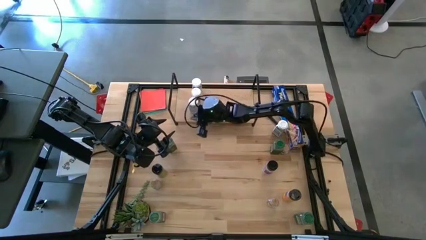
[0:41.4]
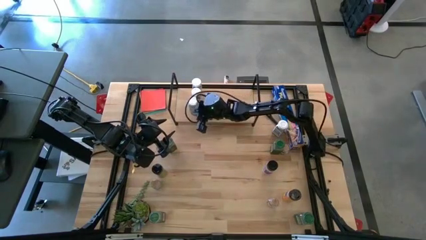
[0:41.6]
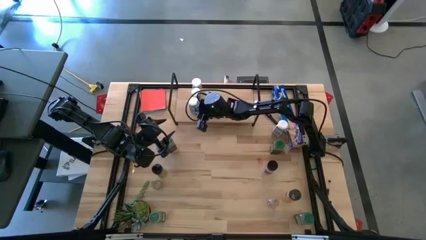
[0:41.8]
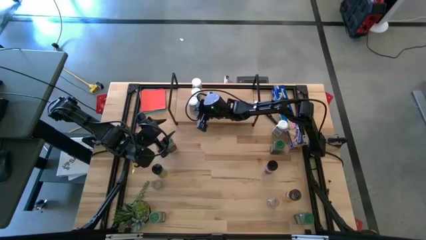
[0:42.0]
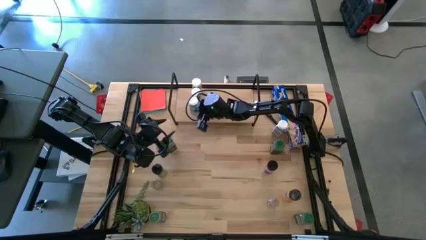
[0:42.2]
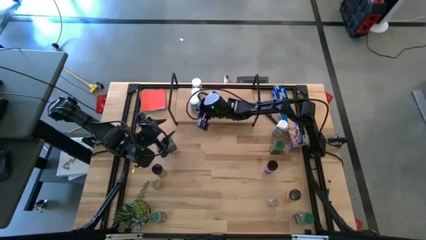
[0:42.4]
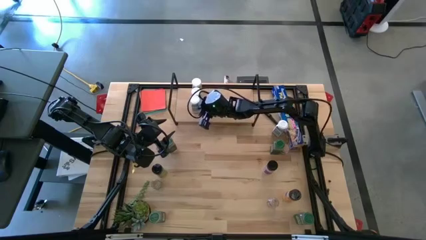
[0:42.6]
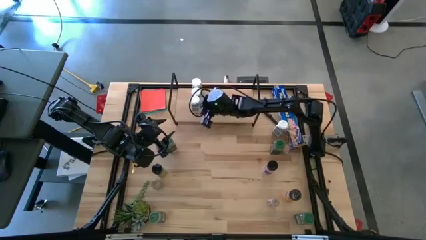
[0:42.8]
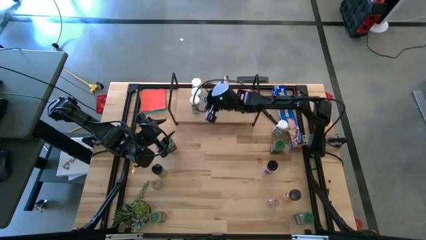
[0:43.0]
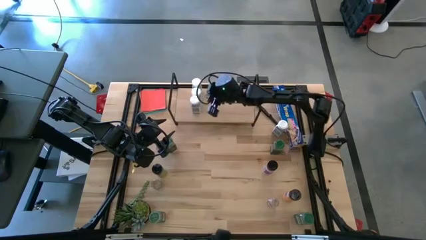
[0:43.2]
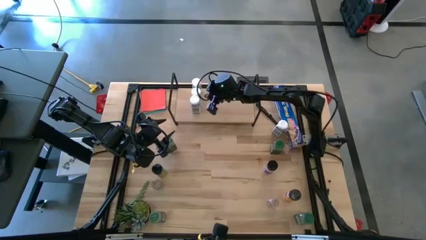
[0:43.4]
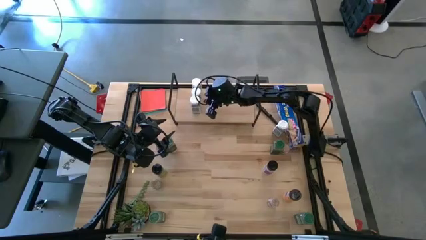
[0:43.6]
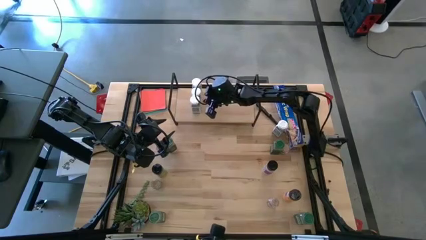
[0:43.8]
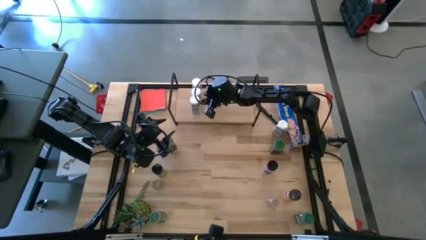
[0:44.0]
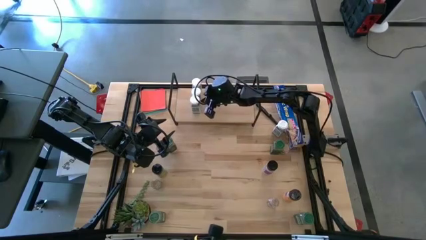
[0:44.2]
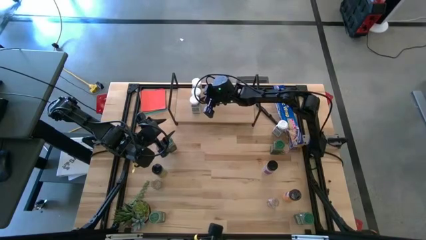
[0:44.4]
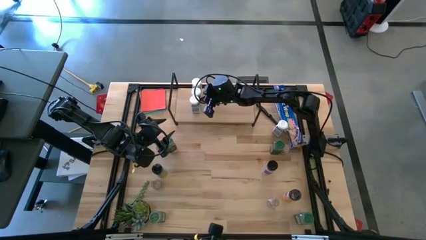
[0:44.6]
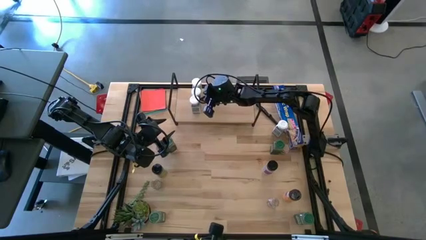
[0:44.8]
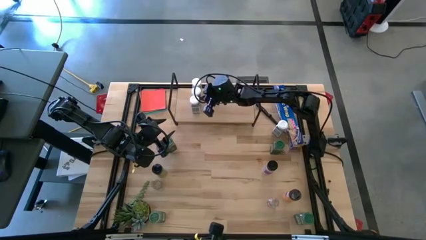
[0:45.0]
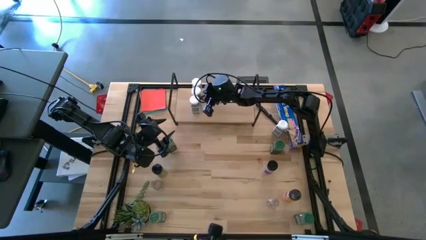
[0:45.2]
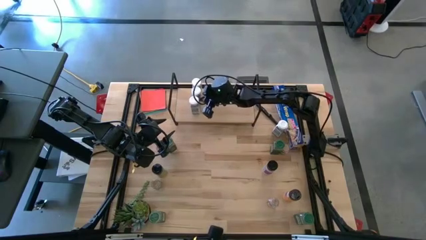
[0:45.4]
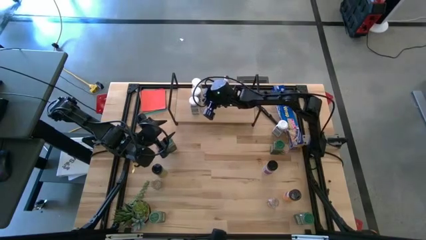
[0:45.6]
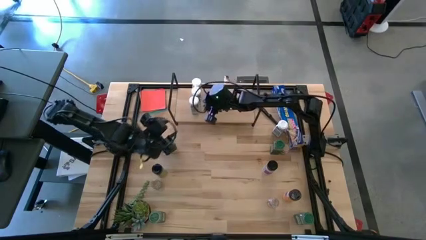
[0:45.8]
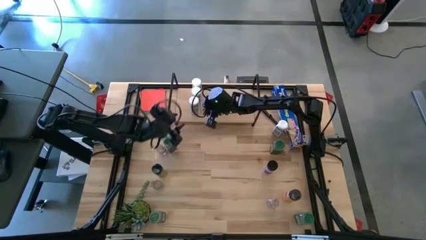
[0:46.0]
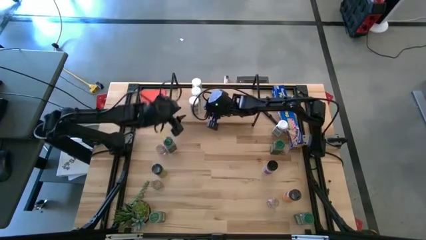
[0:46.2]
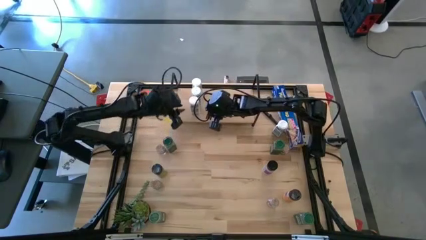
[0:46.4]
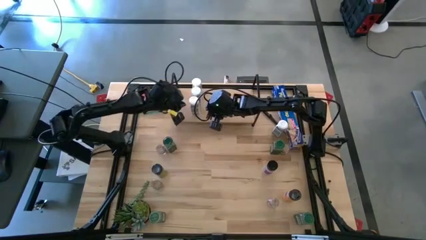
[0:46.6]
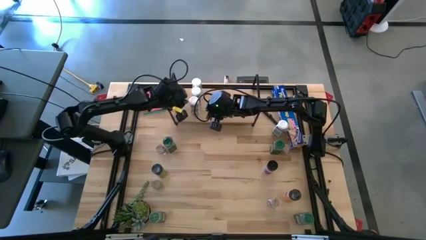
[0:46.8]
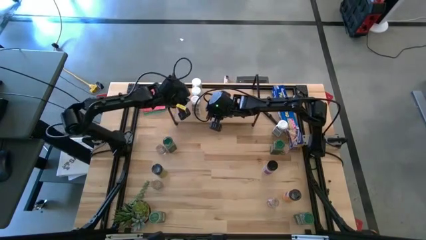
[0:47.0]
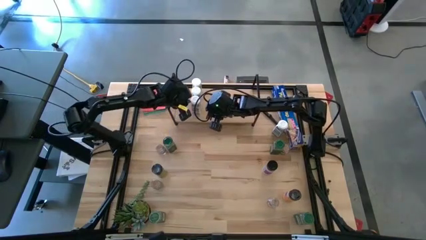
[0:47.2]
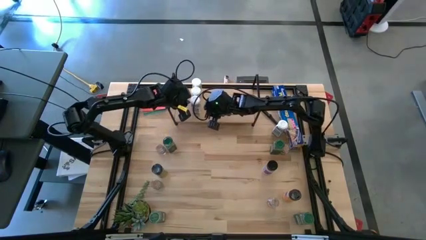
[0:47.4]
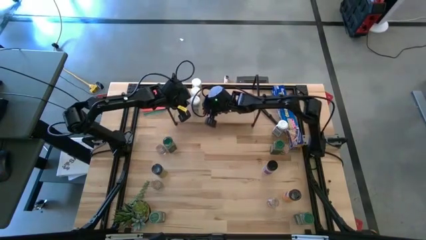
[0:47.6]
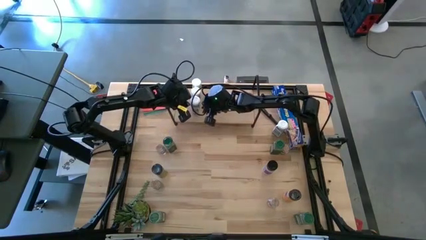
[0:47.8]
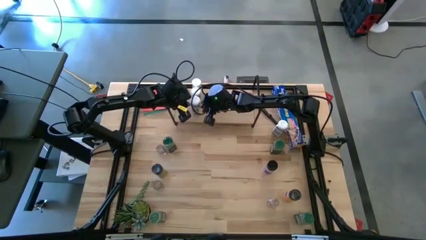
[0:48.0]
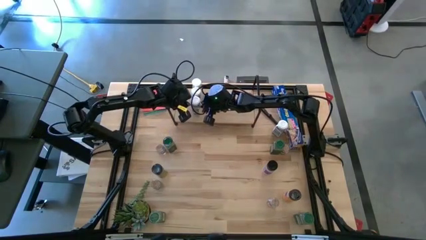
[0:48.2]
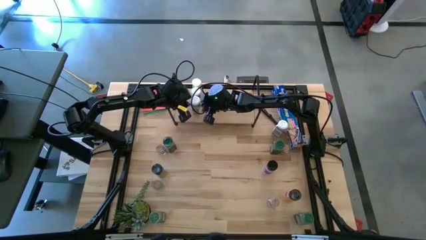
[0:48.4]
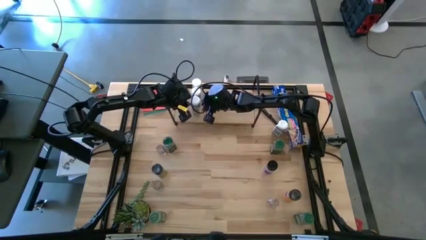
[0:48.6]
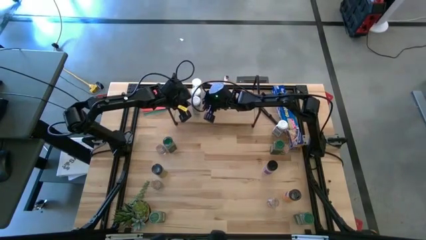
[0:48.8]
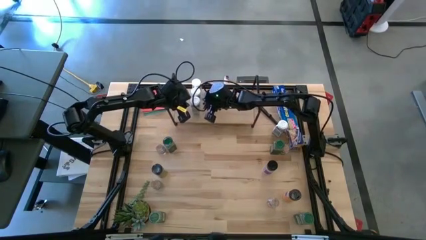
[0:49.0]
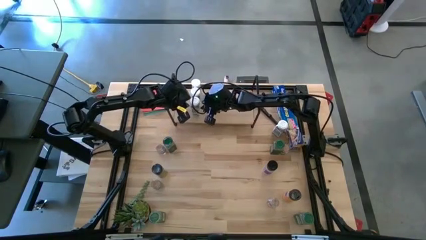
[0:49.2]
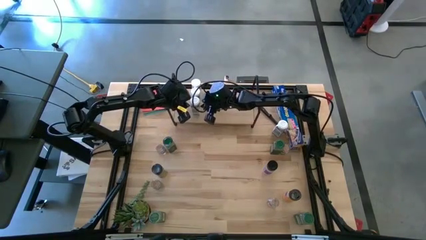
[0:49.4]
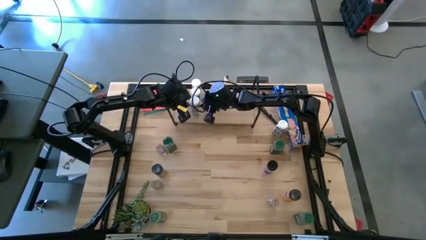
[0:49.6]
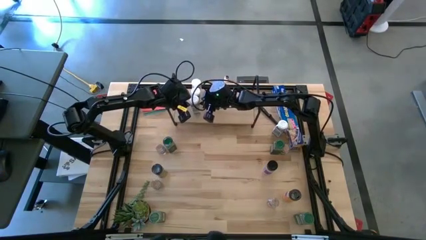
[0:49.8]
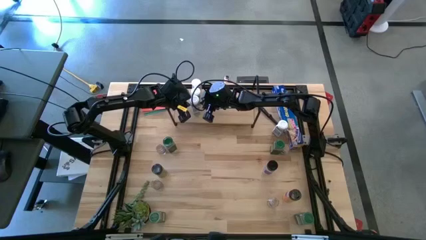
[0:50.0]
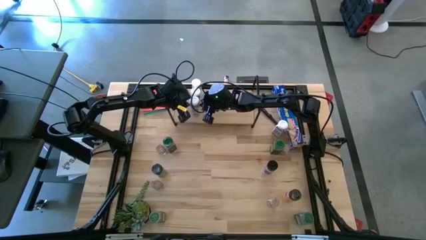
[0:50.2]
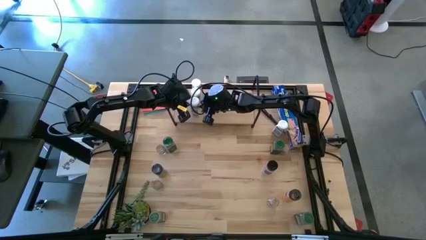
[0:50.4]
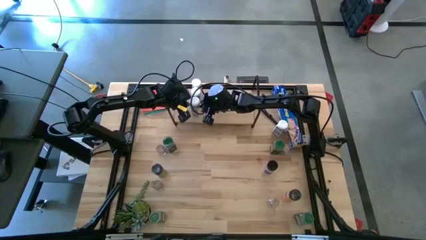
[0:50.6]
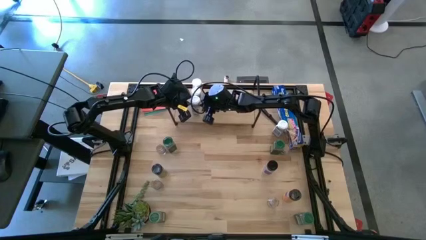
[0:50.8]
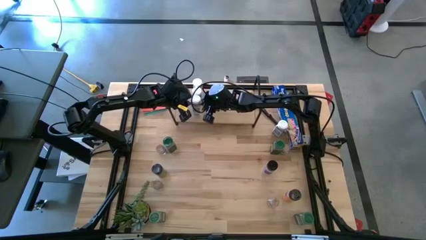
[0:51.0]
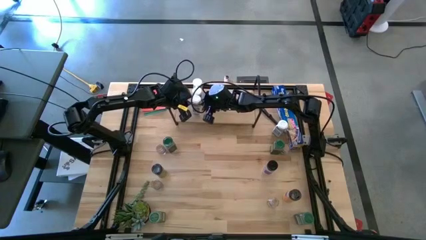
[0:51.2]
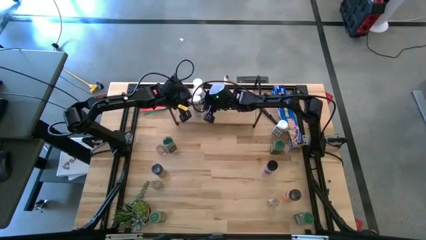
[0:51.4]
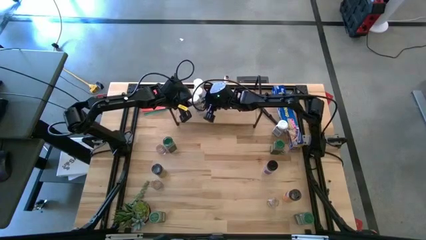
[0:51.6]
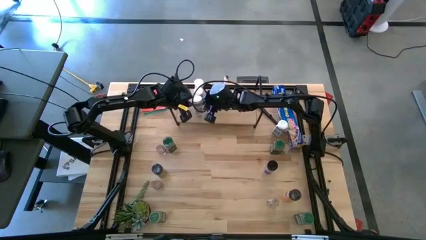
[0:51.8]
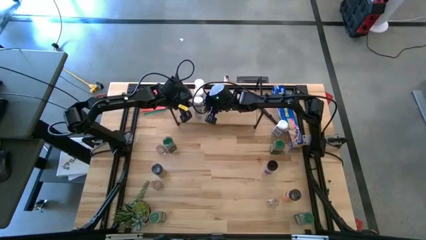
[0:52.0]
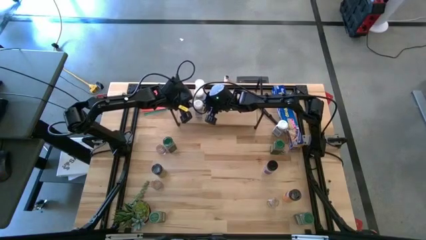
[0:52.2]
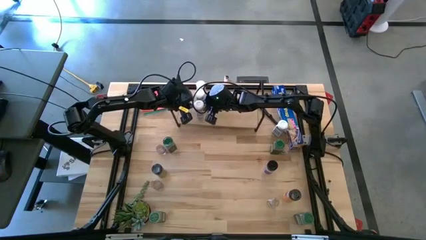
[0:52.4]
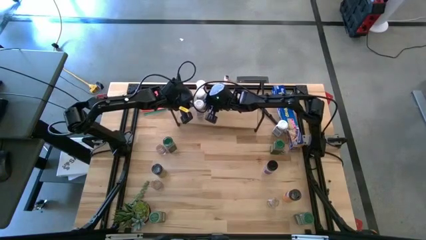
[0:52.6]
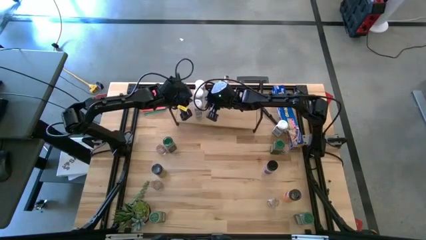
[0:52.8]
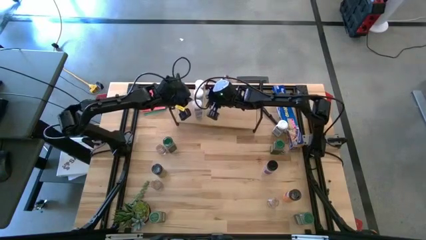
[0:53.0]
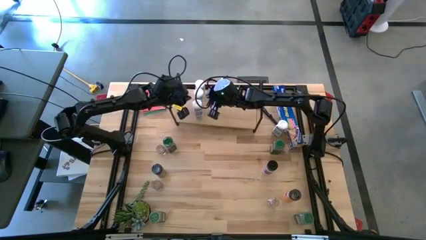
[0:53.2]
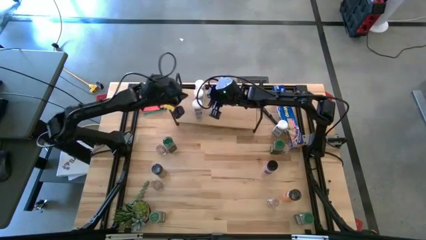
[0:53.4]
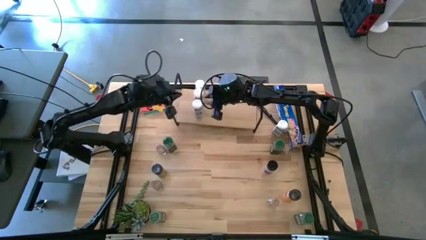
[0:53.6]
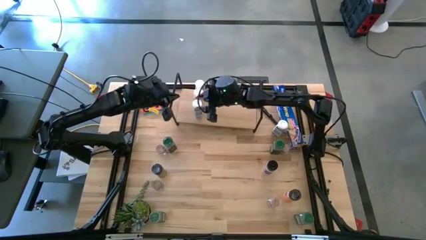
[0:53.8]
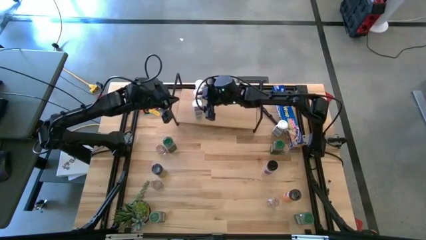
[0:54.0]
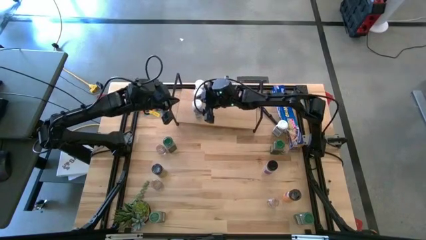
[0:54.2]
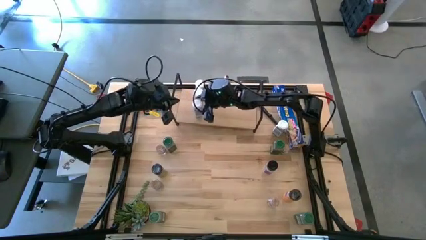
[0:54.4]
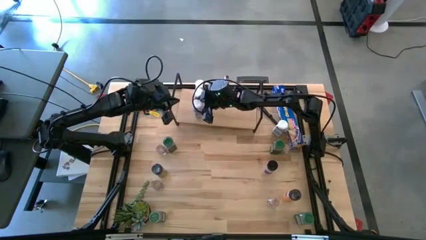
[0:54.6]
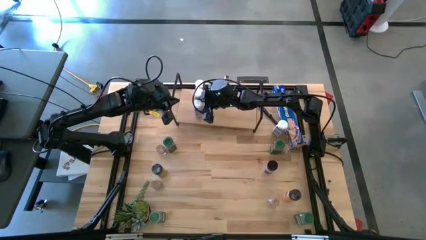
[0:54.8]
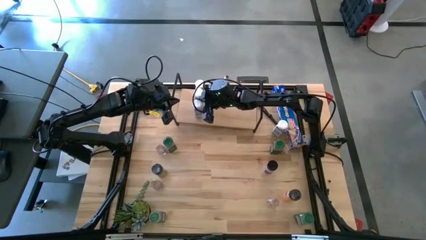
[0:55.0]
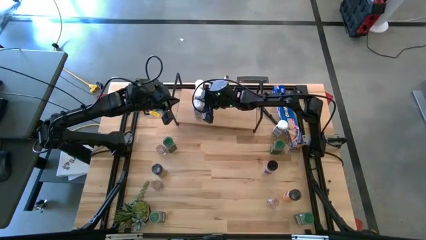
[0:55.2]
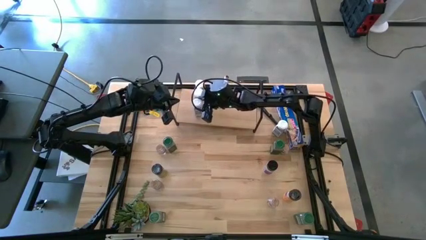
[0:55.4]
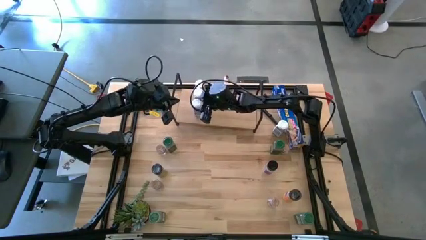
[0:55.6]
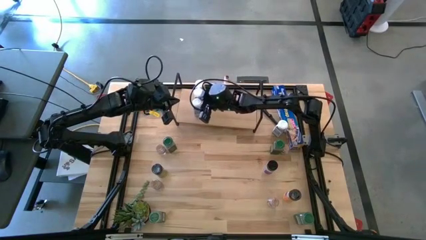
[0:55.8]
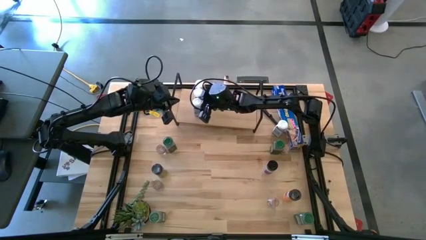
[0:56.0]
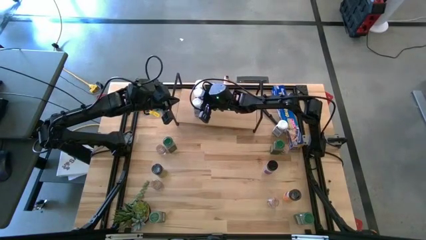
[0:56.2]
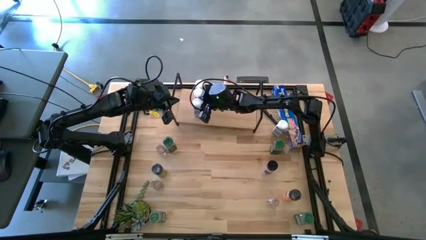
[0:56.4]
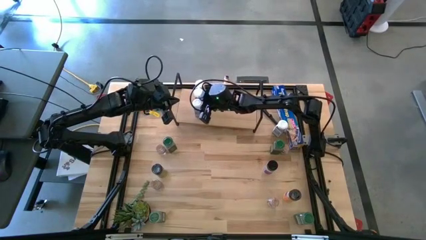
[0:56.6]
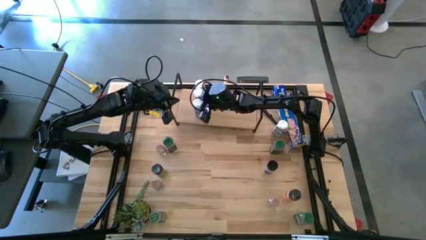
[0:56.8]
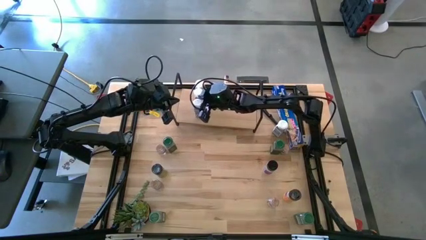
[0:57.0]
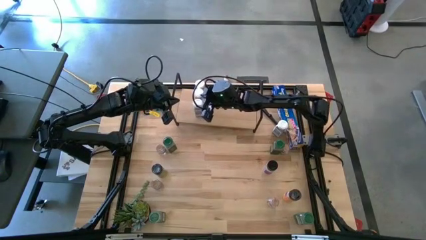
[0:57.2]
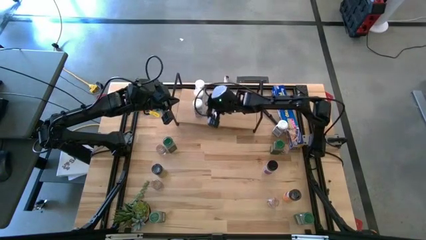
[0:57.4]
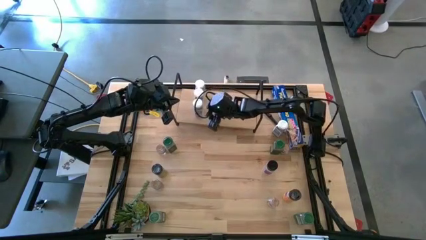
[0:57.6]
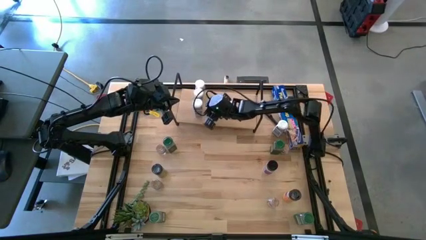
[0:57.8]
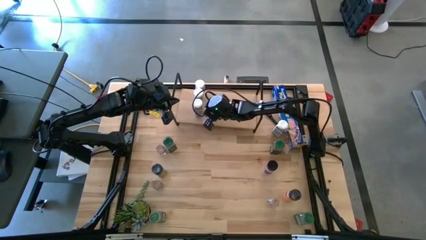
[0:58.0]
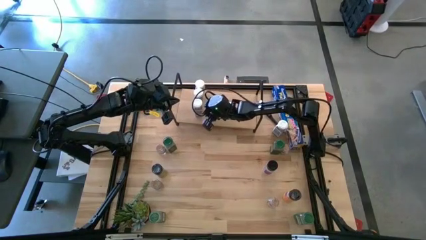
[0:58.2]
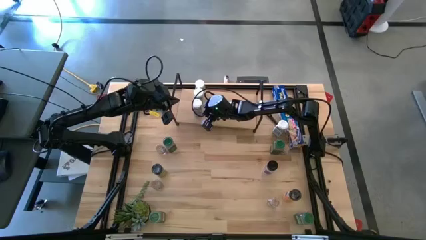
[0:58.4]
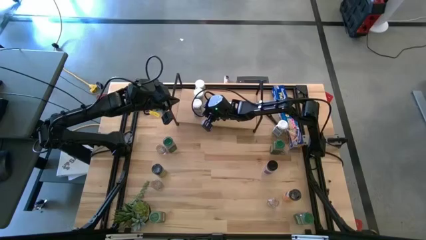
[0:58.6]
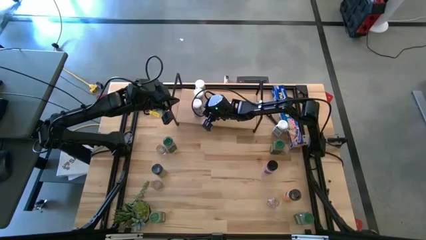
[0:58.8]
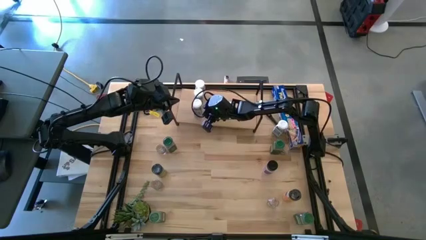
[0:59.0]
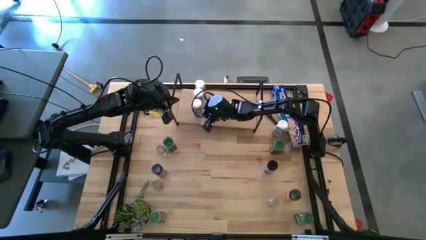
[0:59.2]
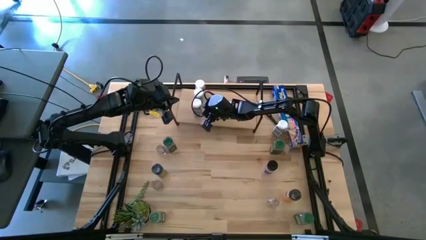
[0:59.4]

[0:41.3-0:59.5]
Task: Shelf spices
Put the bottom white seasoning bottle on the shelf aligned with the other white seasoning bottle
